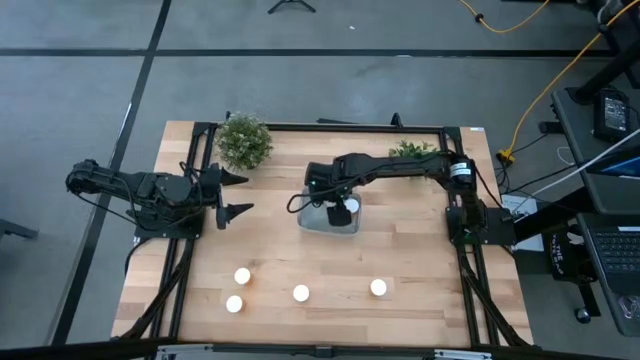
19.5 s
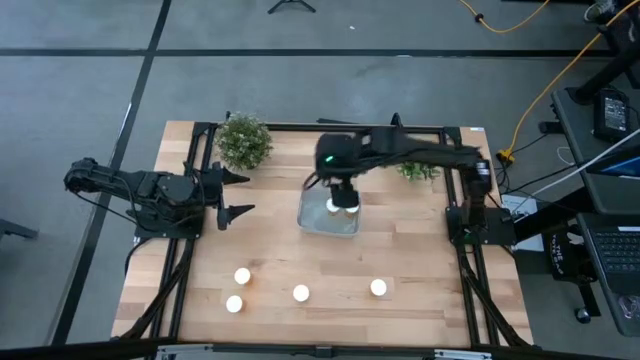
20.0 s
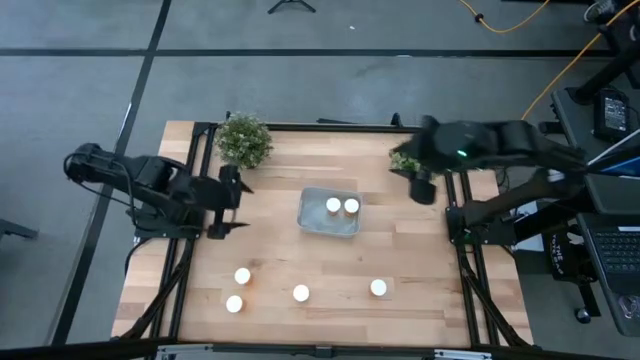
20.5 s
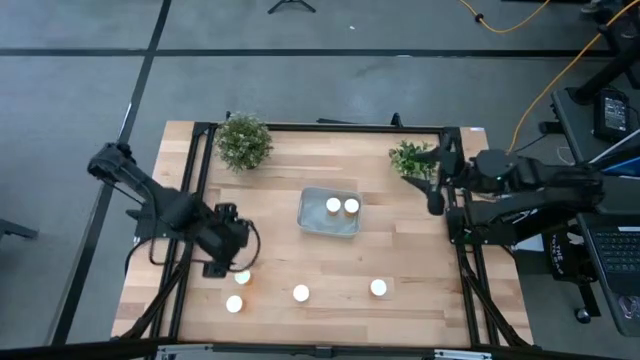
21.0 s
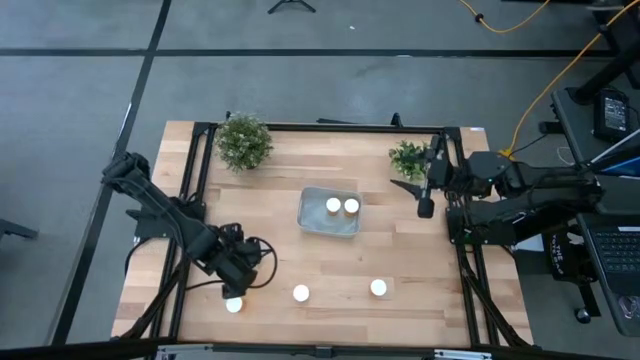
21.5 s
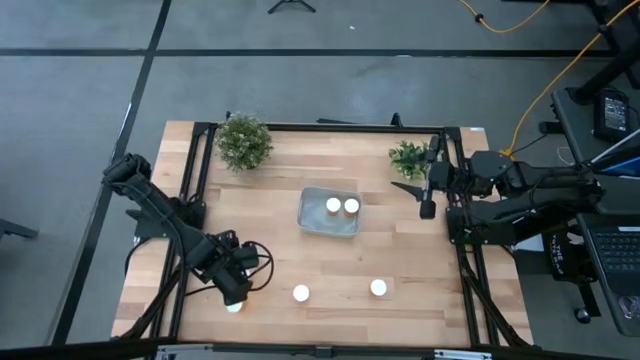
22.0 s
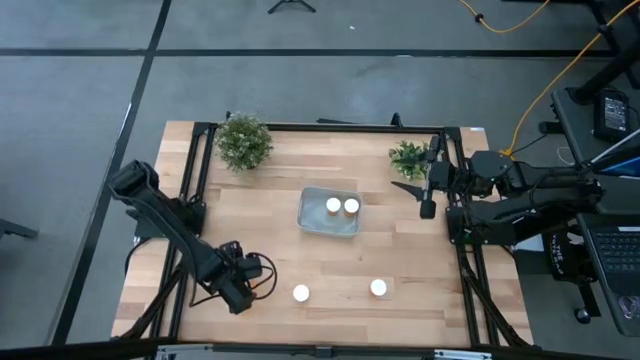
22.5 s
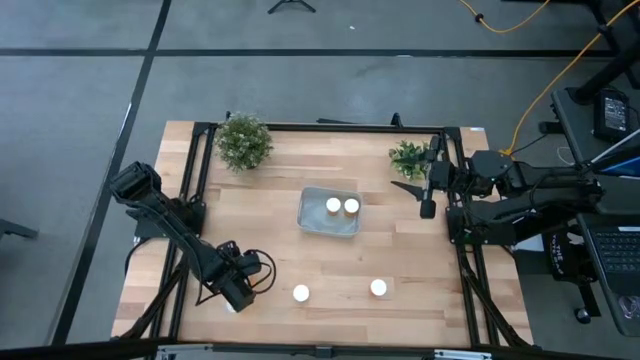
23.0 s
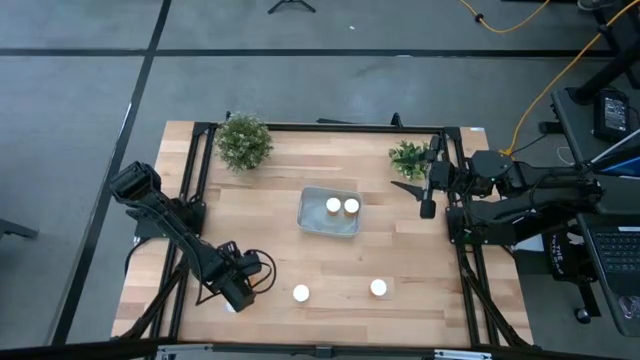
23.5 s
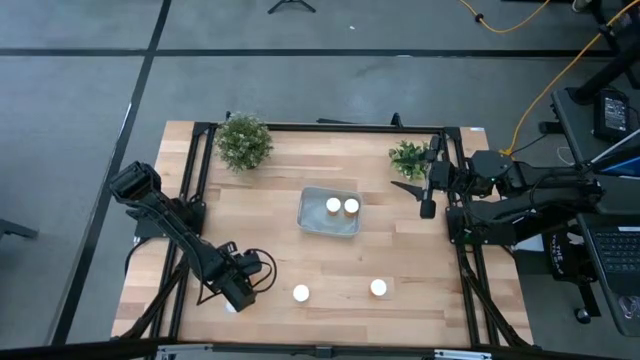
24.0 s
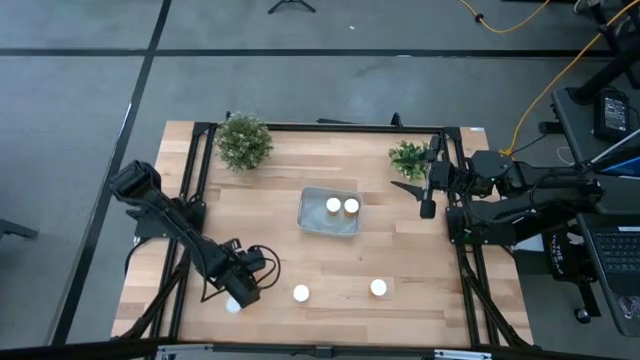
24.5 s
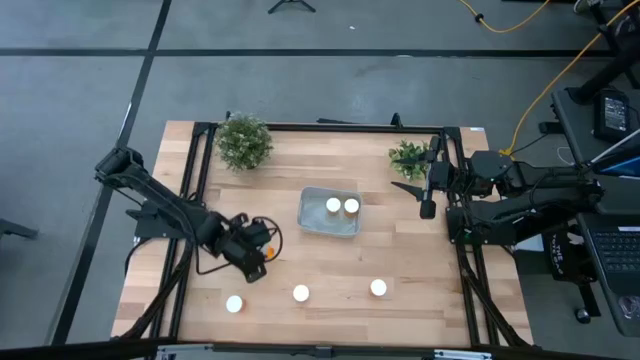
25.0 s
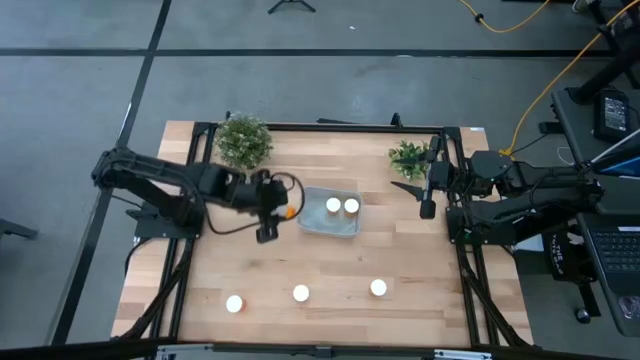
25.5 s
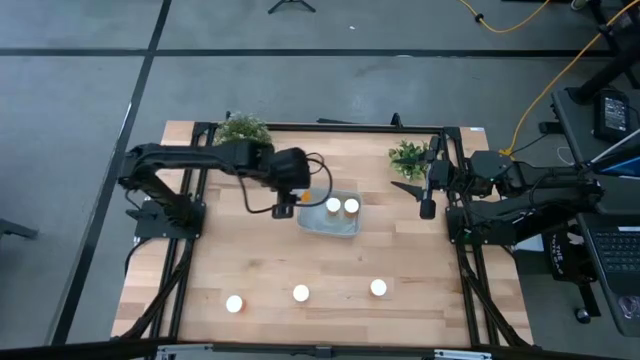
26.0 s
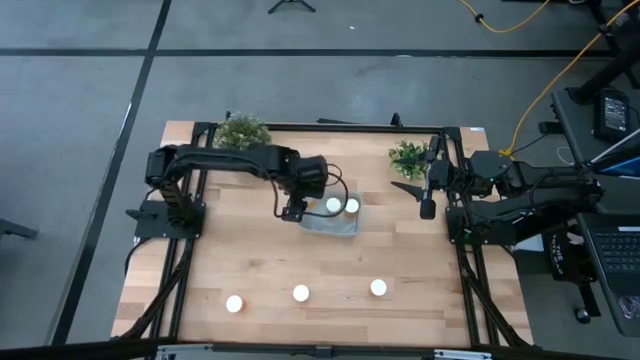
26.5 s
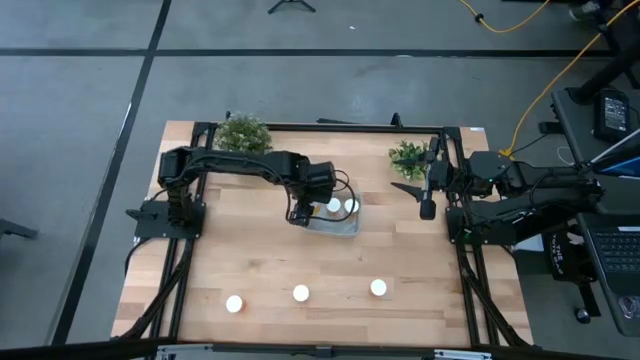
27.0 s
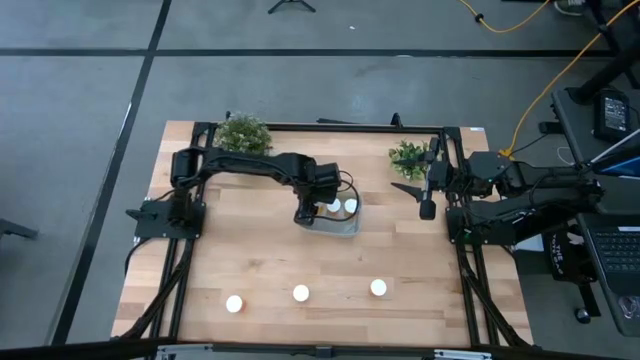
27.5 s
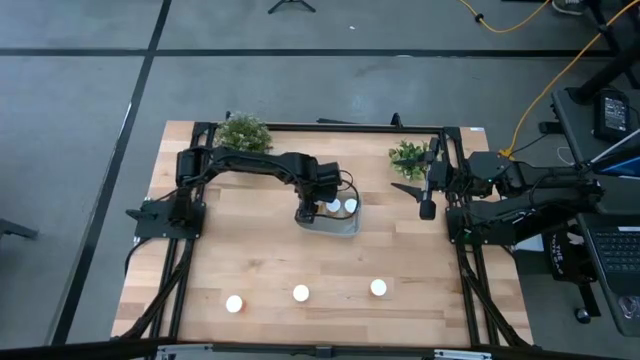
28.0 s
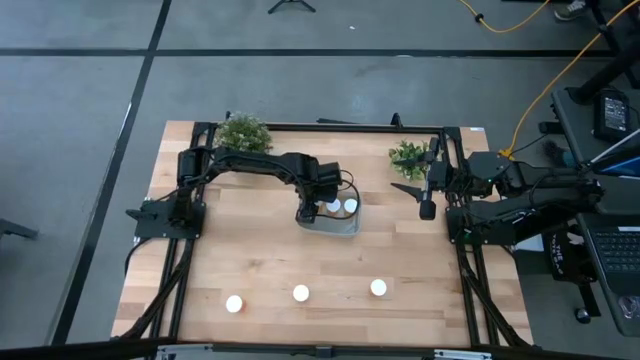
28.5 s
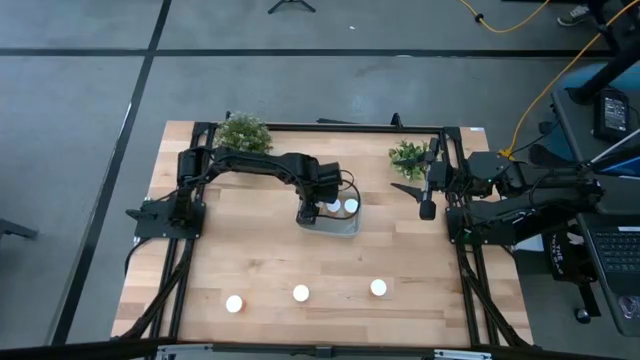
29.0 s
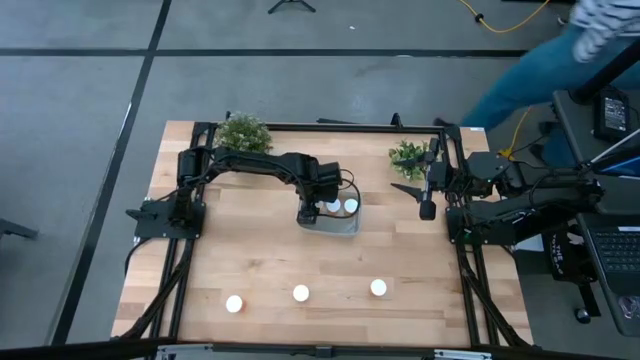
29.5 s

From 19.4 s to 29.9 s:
Task: Pick and place pill bottles into a basket
Put the orange pill bottle into the grey bin

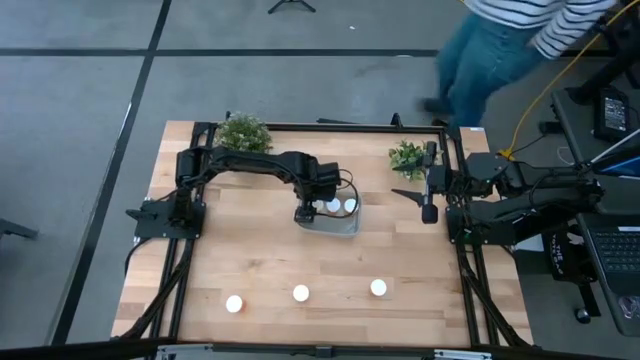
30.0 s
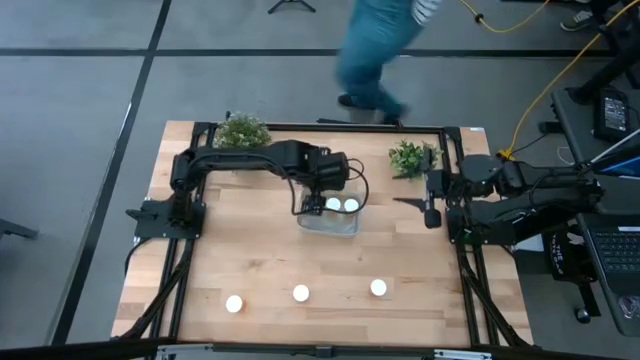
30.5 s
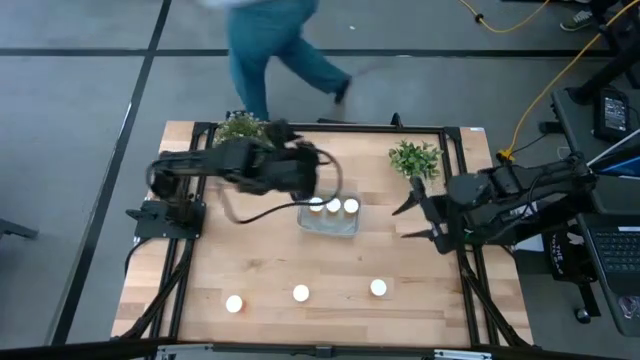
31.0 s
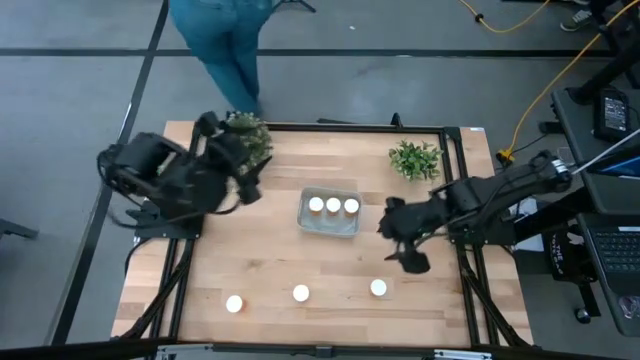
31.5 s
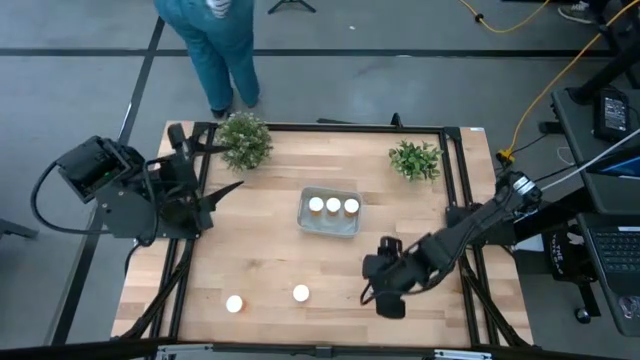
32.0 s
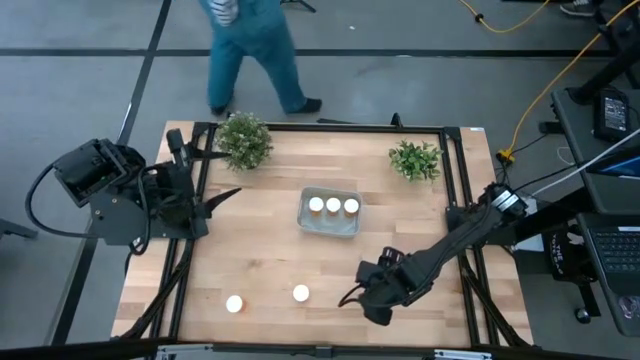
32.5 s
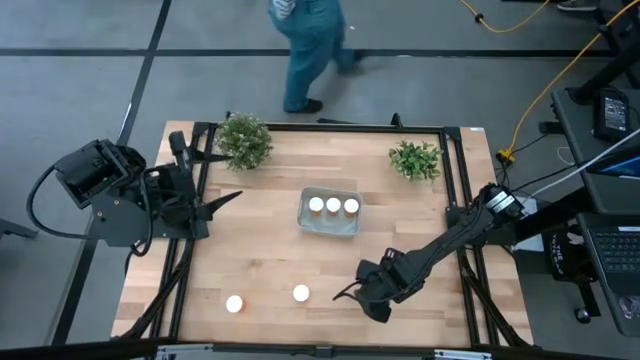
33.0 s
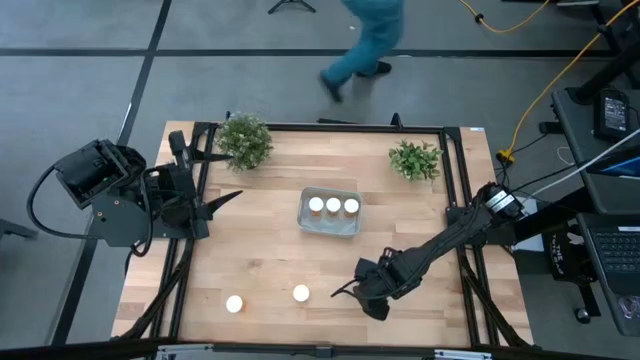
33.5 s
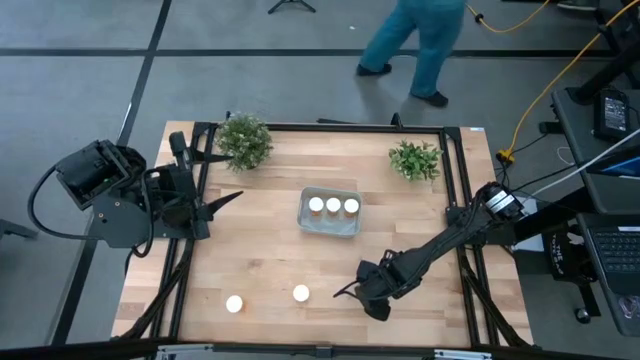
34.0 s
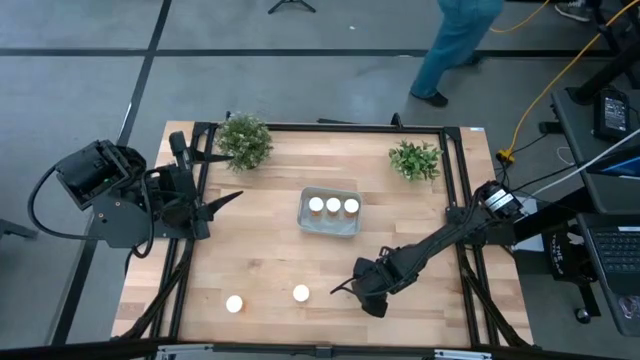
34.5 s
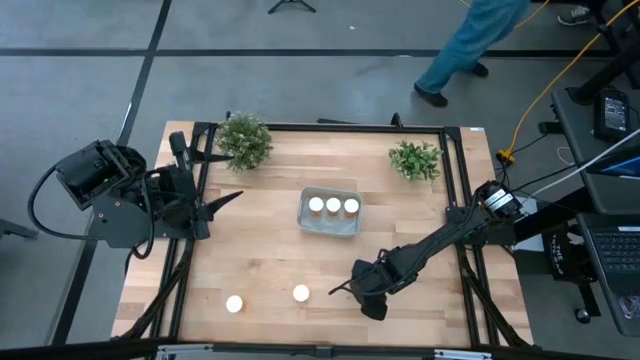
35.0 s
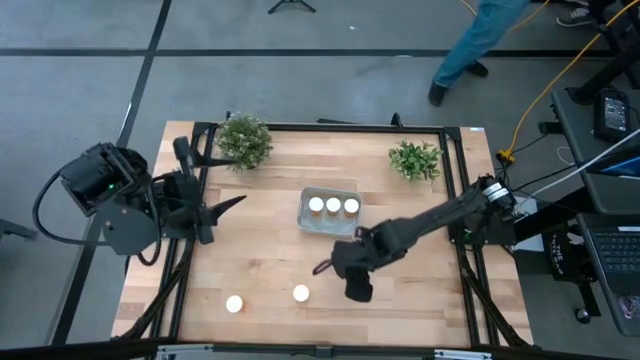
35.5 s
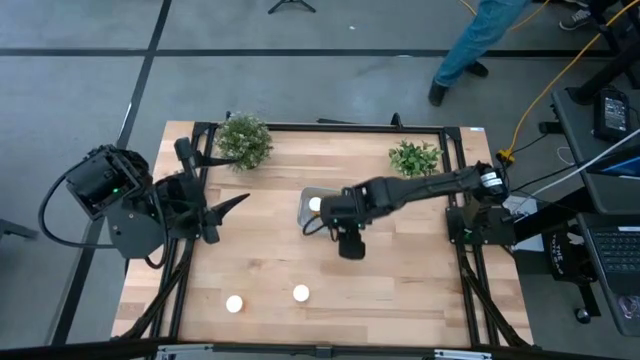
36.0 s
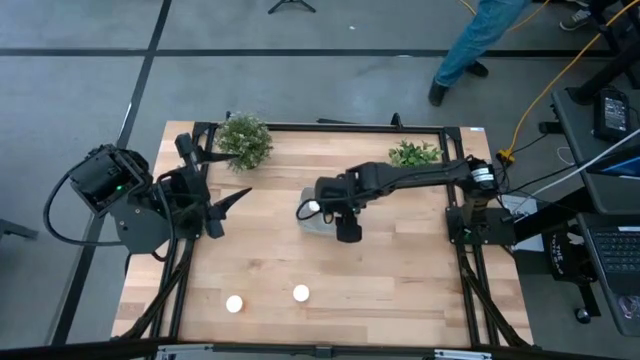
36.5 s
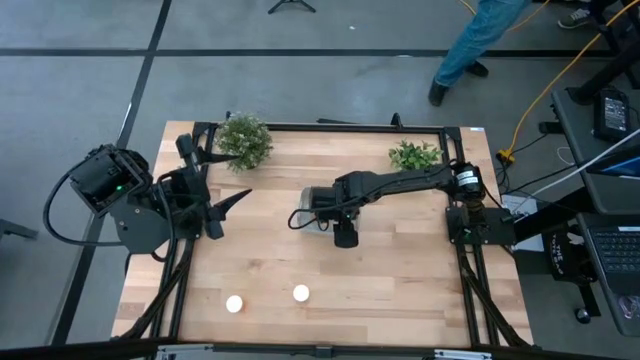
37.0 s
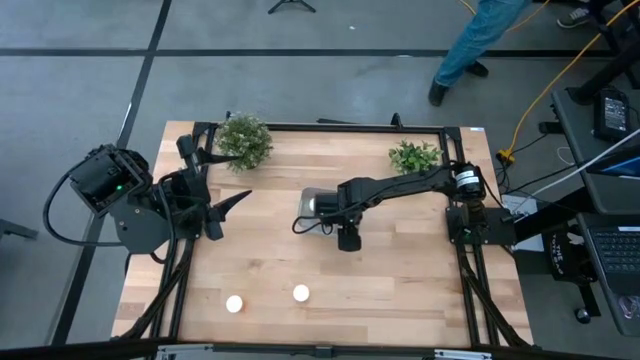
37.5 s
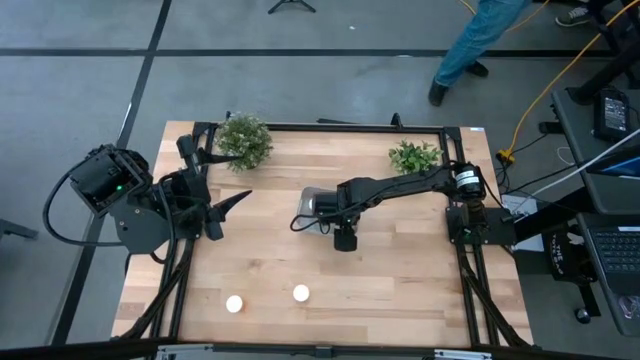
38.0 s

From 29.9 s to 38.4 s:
Put the orange pill bottle into the grey bin

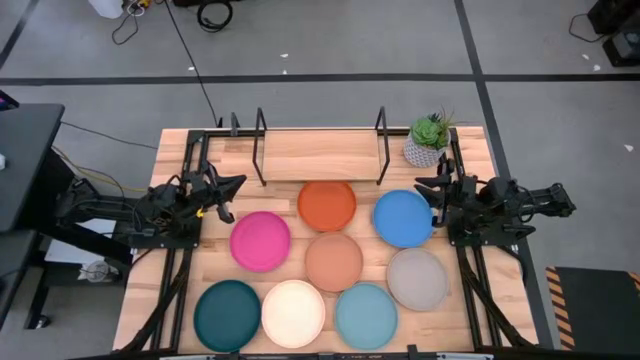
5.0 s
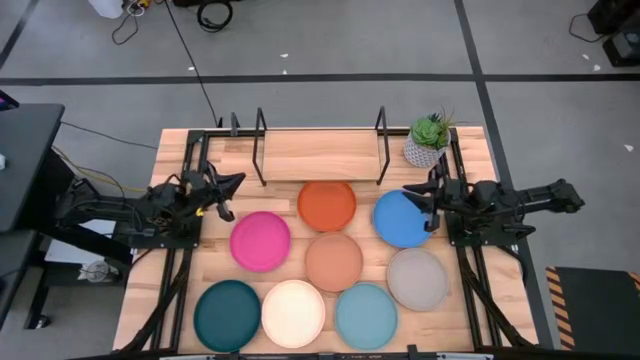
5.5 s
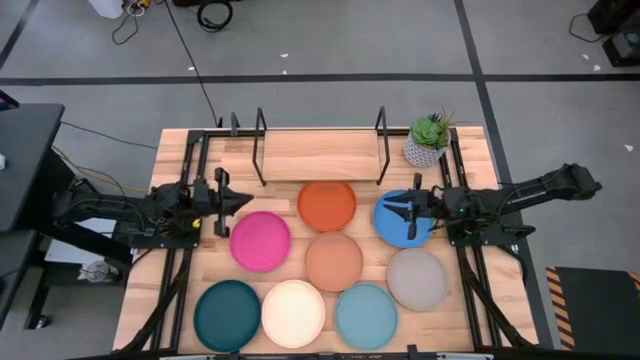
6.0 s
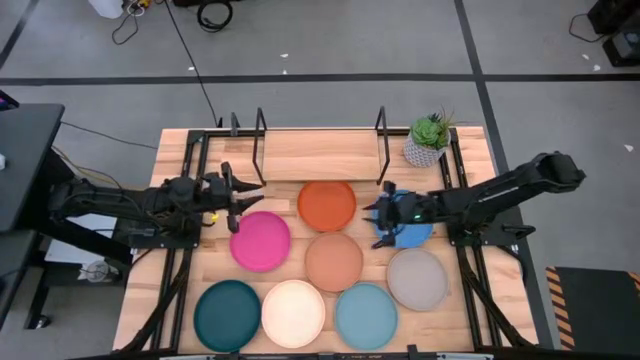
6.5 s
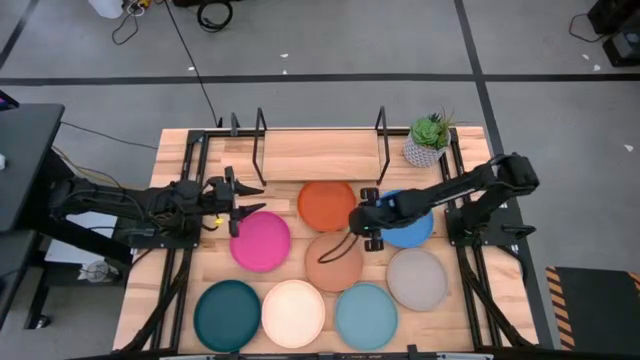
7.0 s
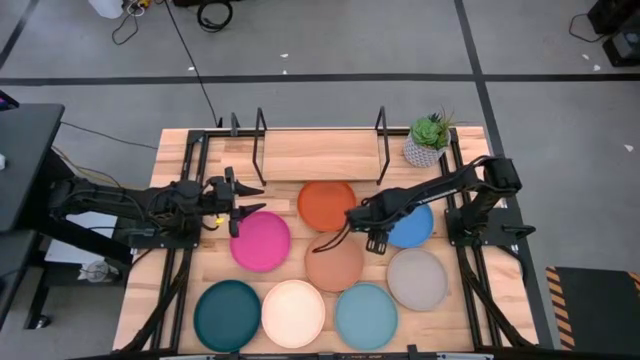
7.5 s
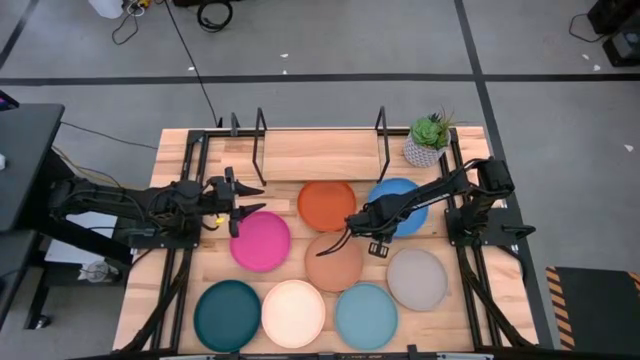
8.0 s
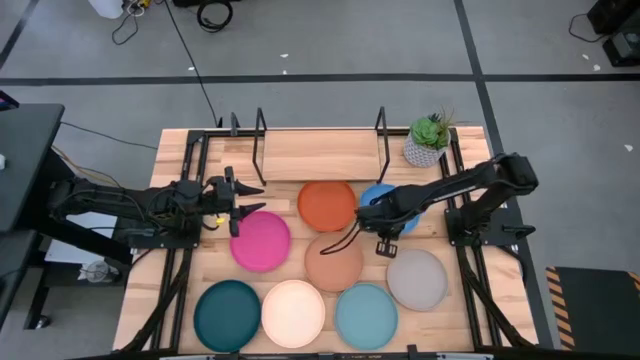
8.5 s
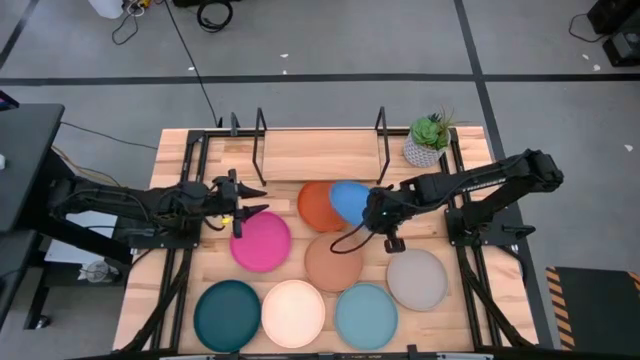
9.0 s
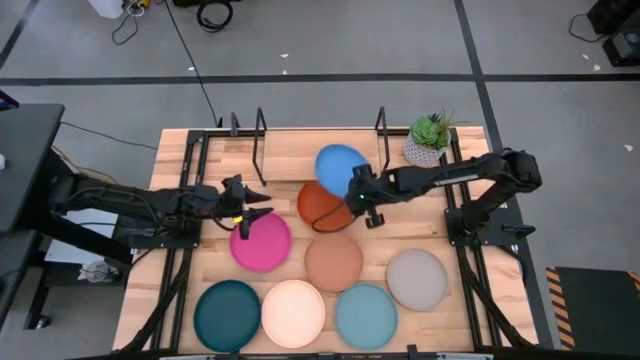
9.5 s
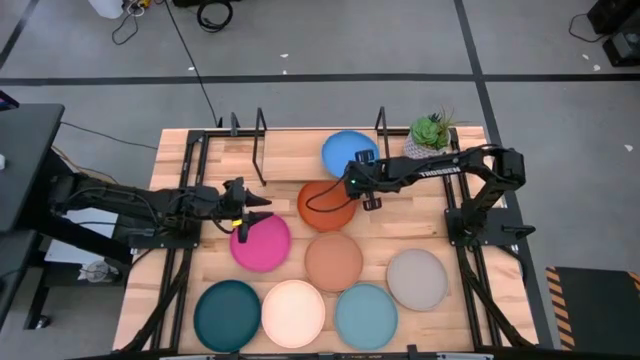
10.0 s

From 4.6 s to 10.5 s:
Task: Place and stack plates onto a shelf
Put the blue plate on the shelf
